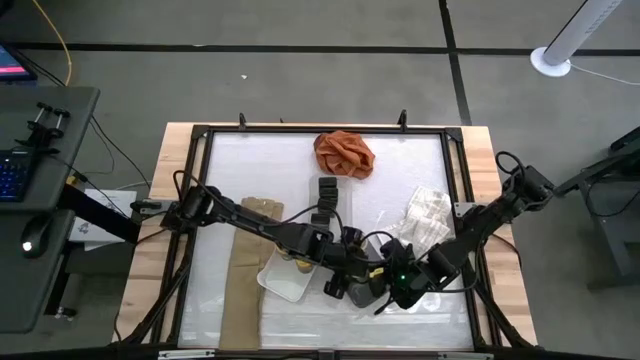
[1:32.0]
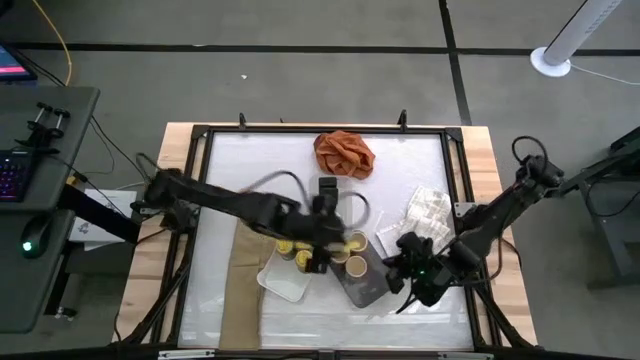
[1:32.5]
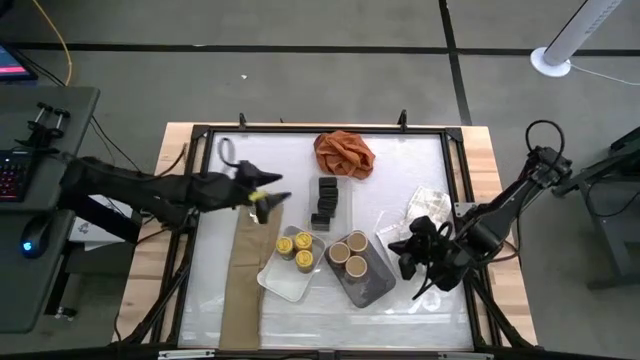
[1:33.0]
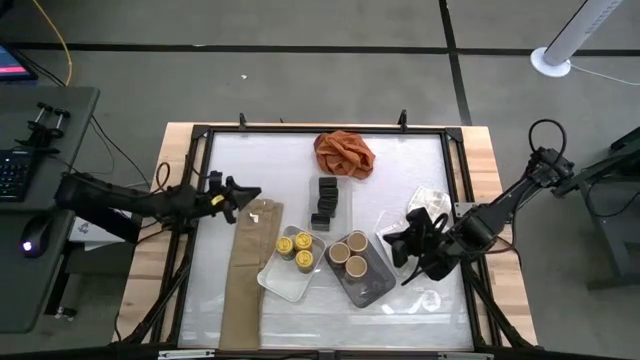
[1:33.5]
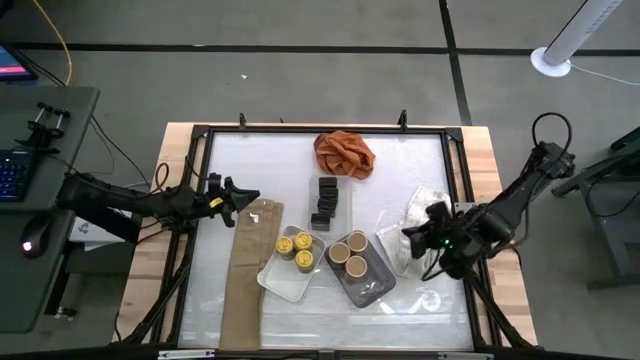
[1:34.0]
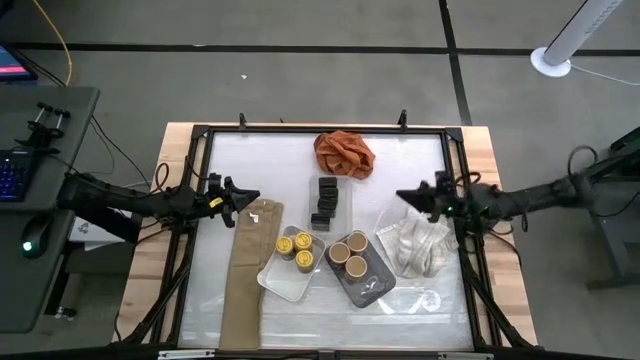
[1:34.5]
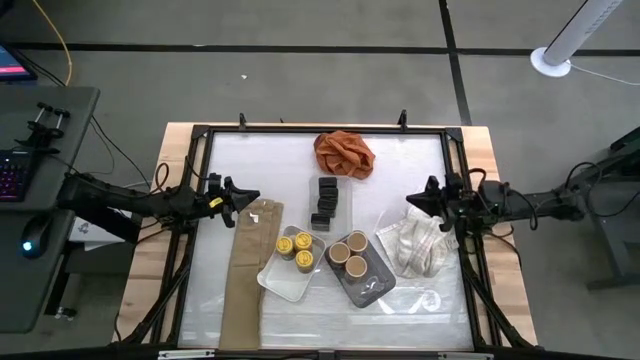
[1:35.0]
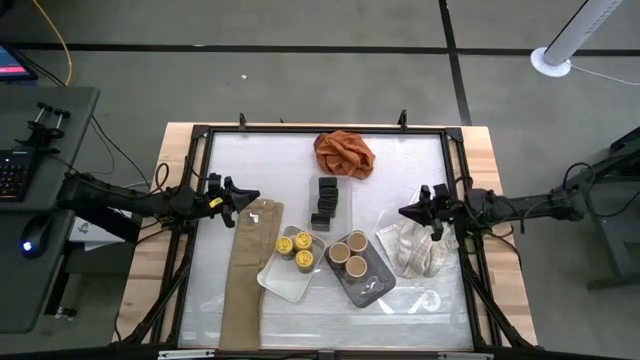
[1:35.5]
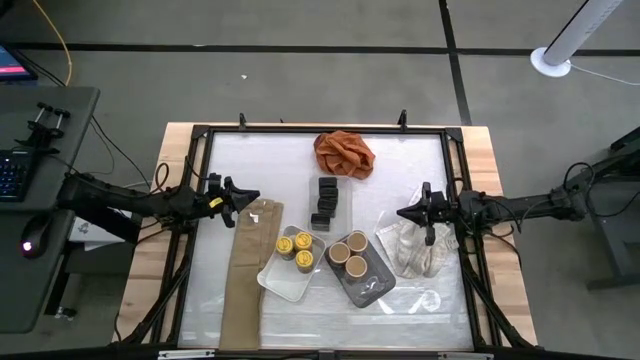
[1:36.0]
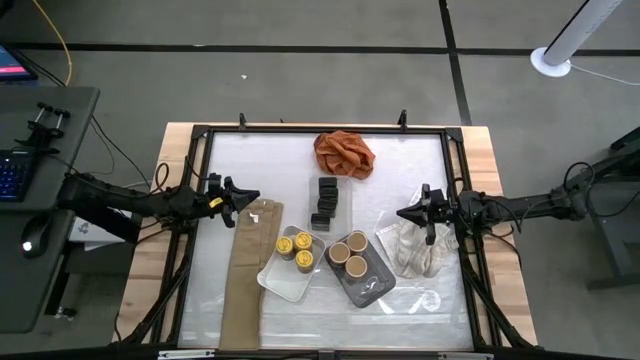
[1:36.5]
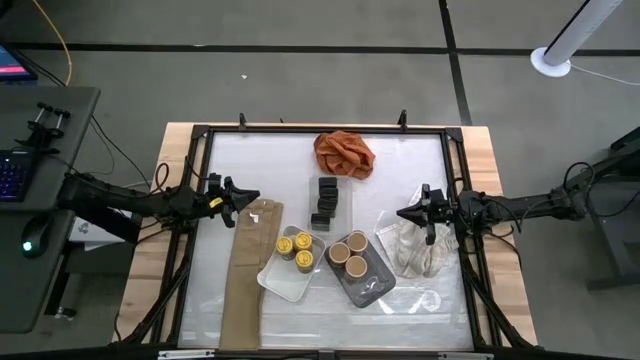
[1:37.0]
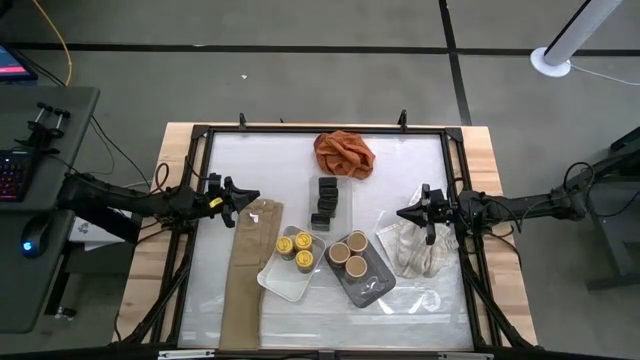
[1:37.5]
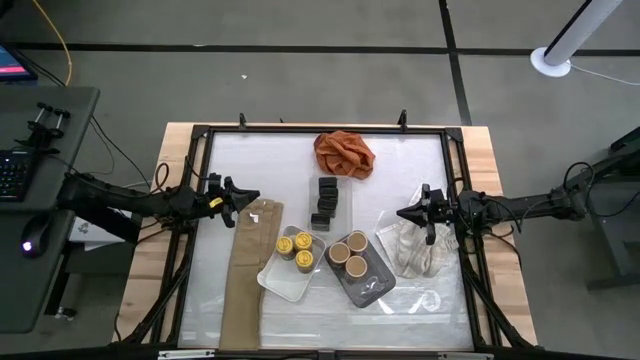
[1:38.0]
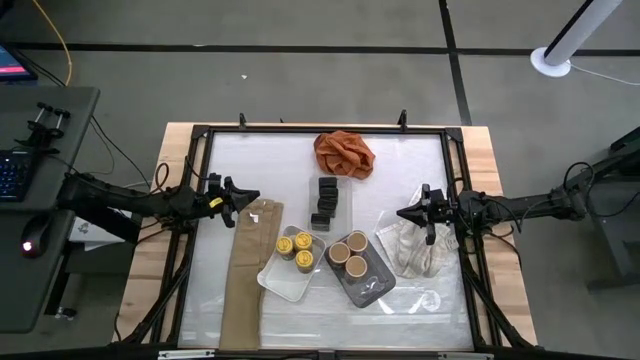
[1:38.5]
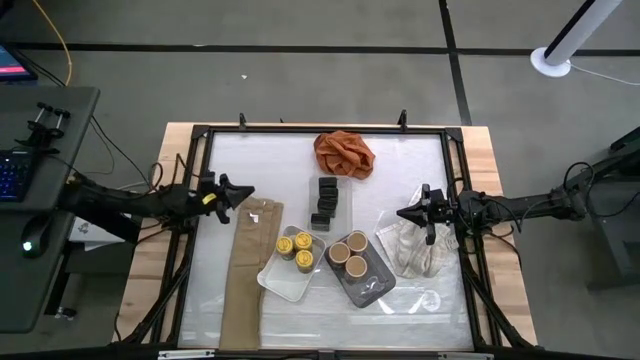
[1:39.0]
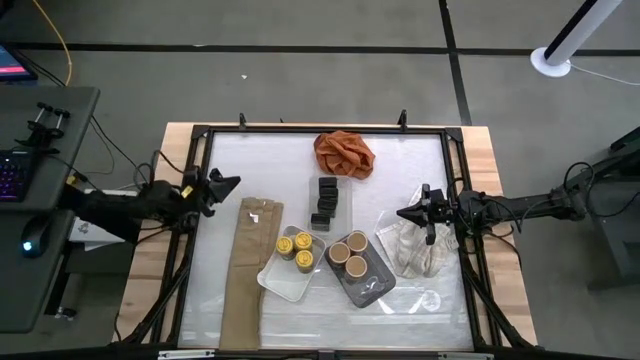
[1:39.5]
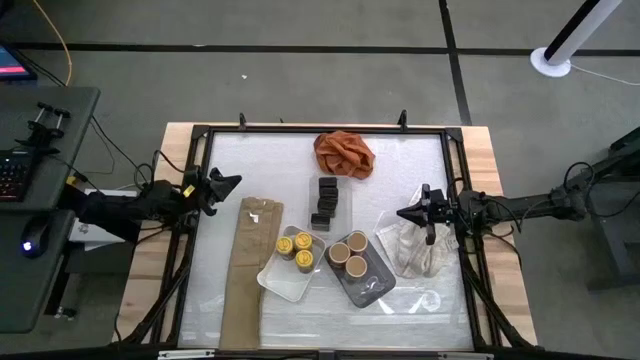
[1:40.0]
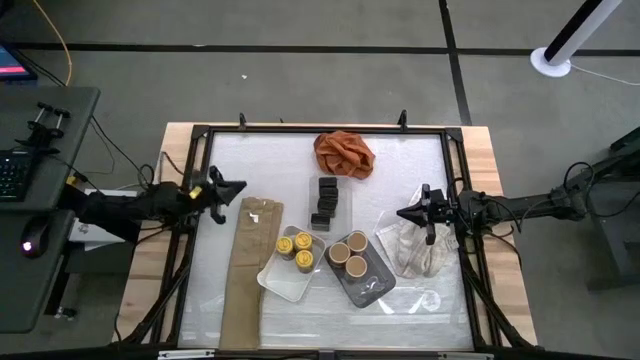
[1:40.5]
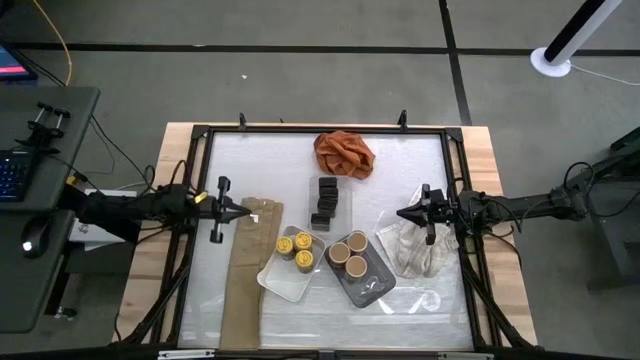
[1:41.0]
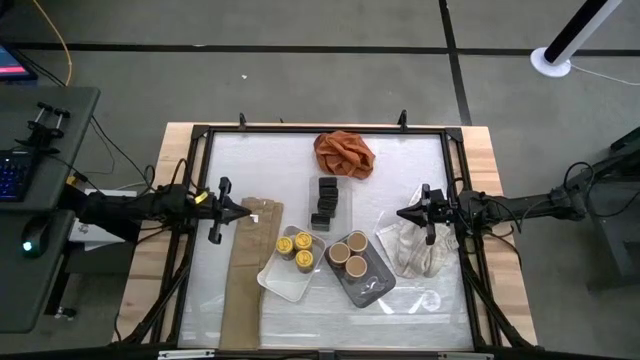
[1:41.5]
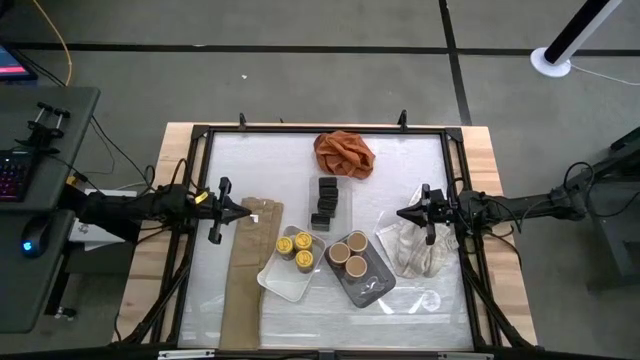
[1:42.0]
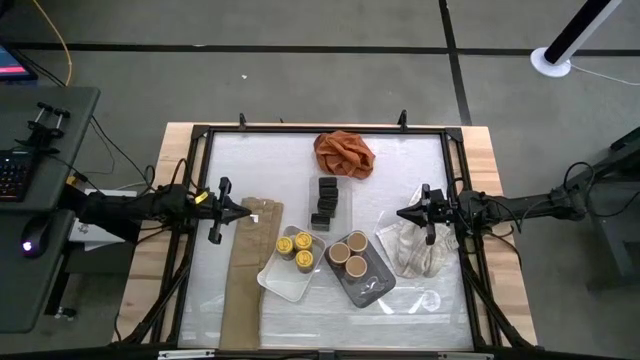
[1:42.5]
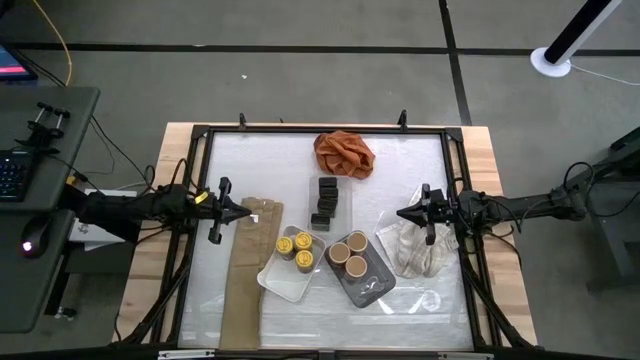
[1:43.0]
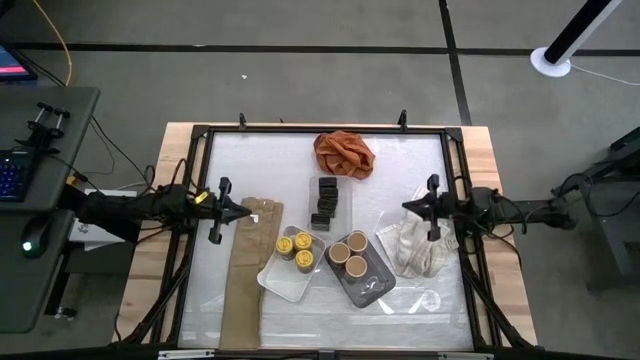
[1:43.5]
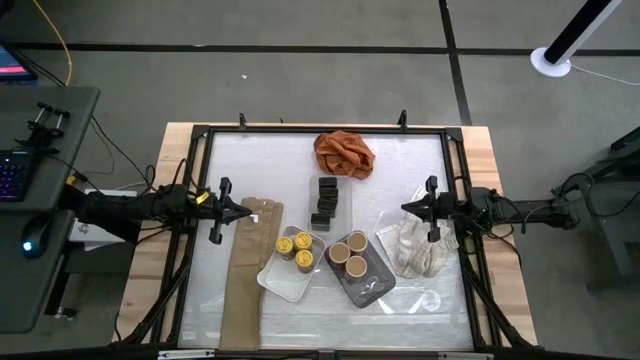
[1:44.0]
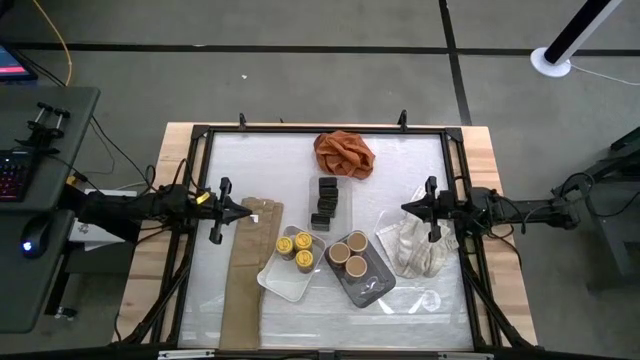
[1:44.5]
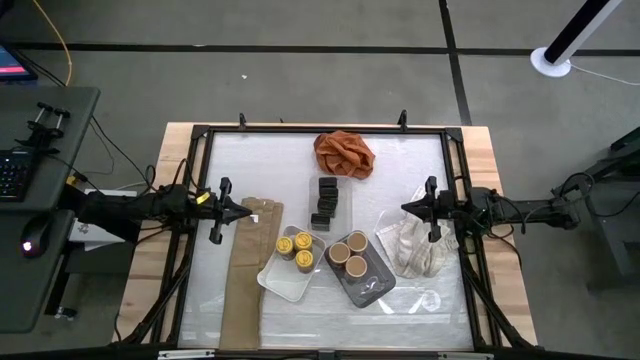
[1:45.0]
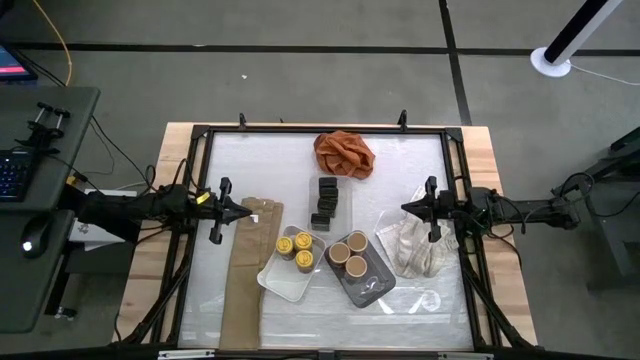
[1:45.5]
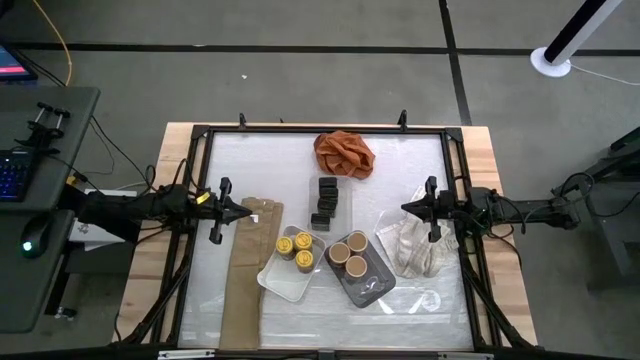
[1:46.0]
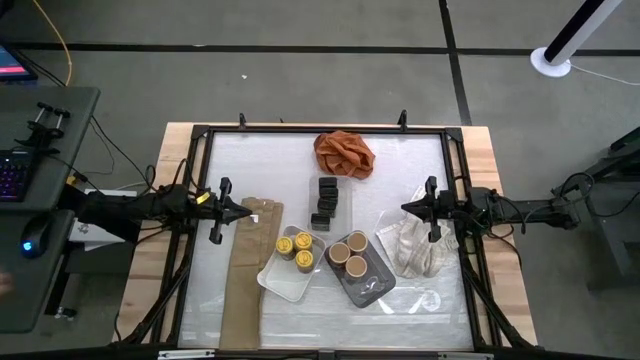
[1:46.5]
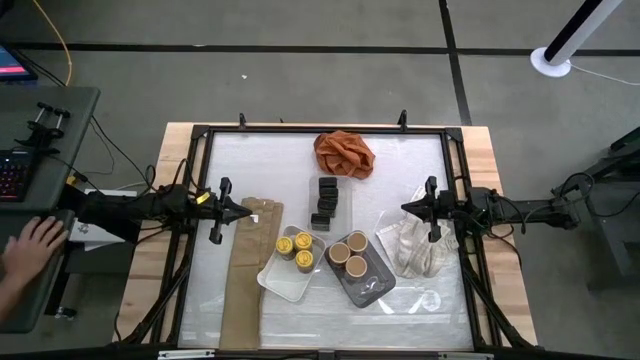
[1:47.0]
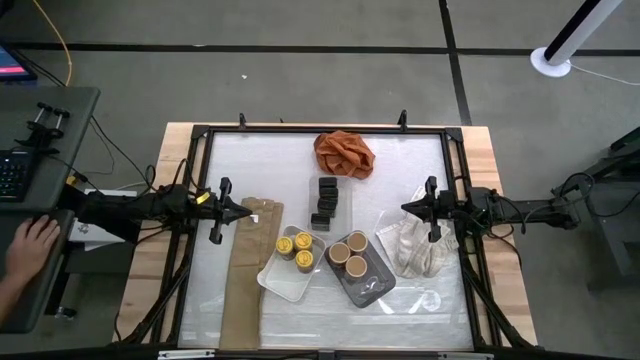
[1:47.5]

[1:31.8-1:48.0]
Task: Sort spices by type
Return to Home Position

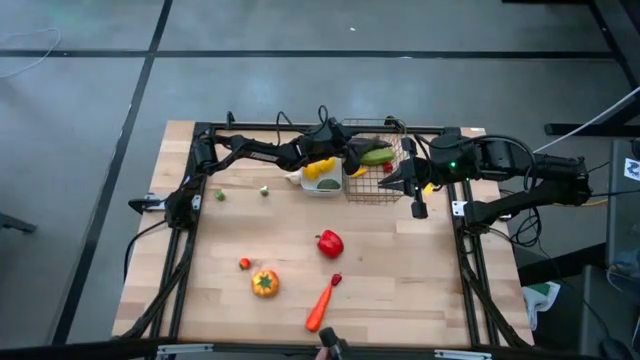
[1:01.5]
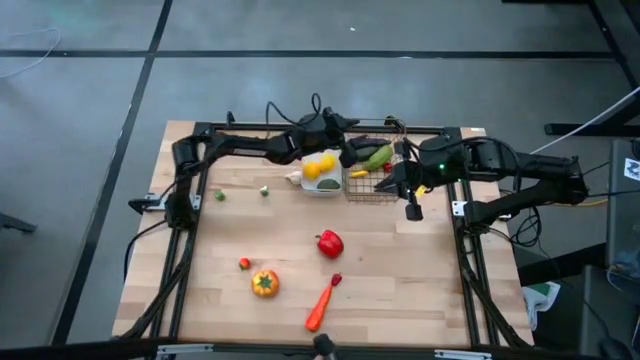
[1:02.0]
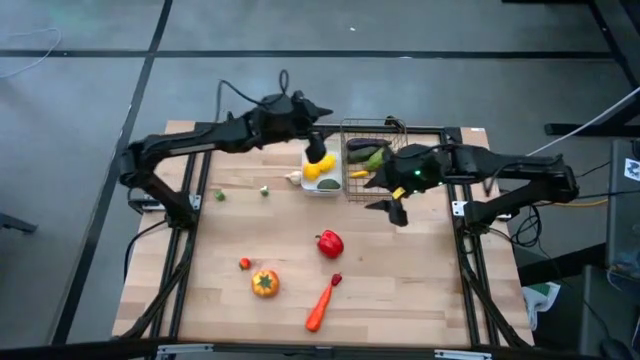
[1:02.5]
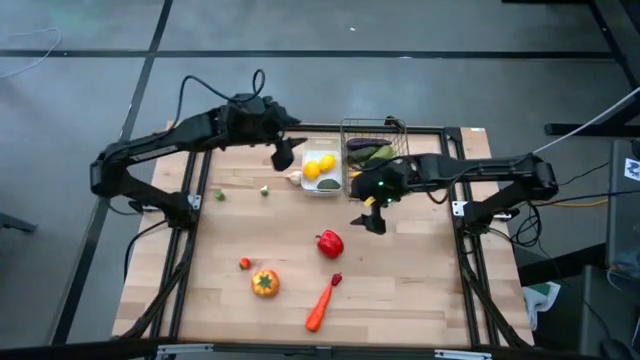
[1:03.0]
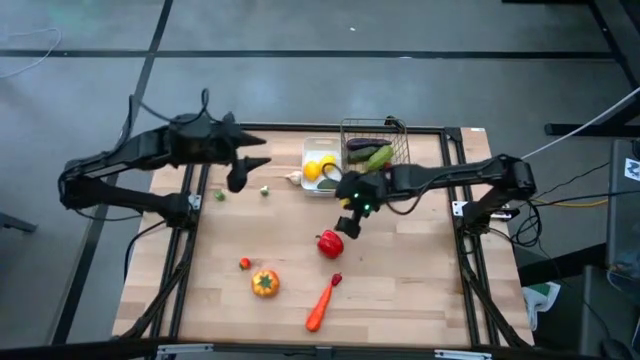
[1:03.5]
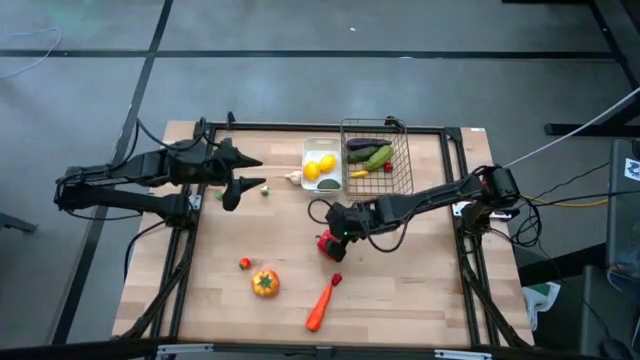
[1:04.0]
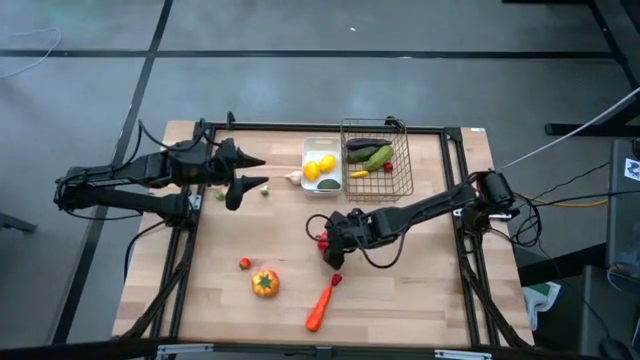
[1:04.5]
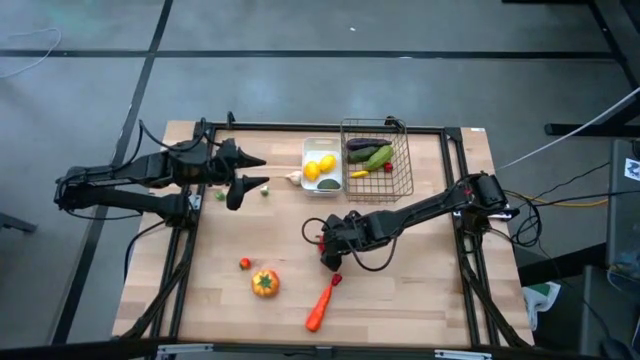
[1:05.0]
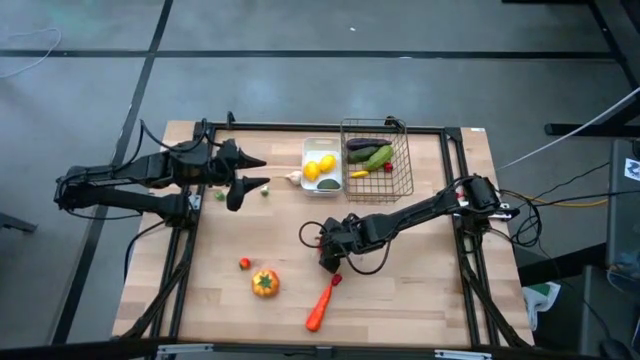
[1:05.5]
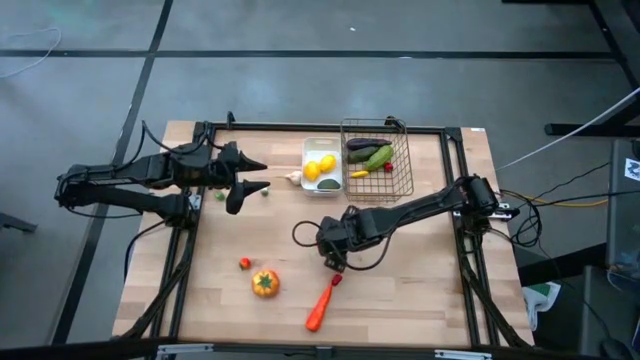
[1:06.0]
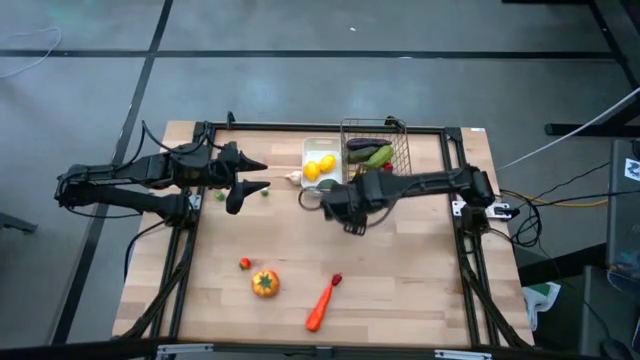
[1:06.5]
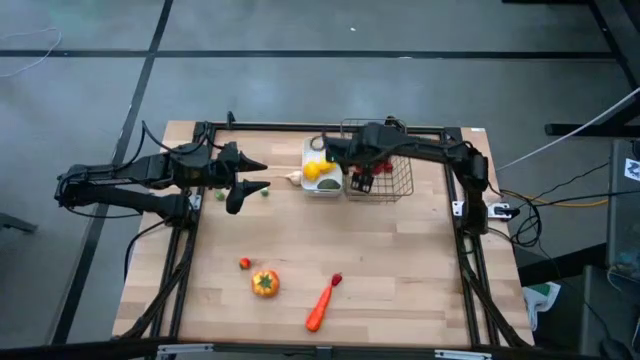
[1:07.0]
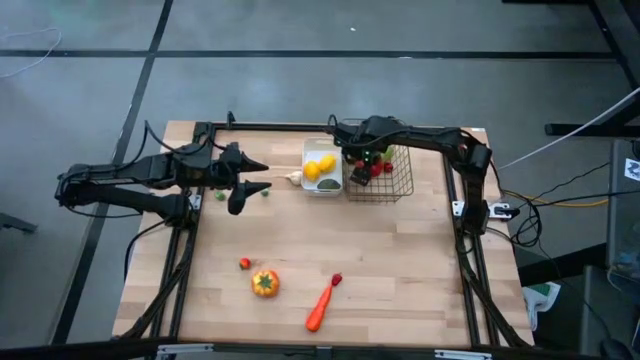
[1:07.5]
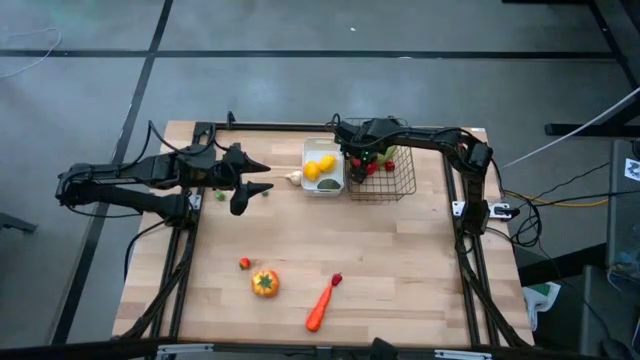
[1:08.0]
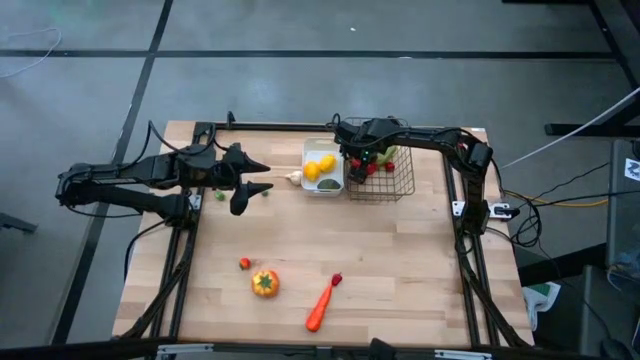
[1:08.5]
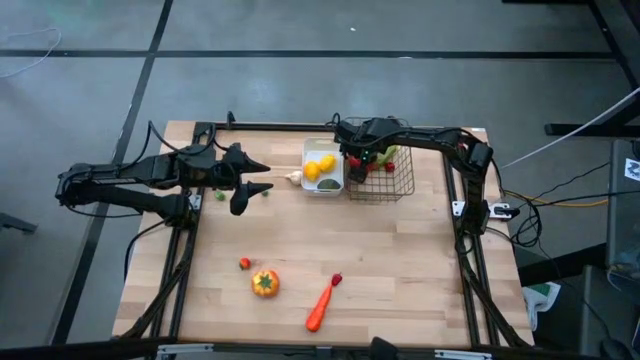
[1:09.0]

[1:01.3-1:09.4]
Task: Sort produce into baskets
Put the red bell pepper into the gold wire basket
